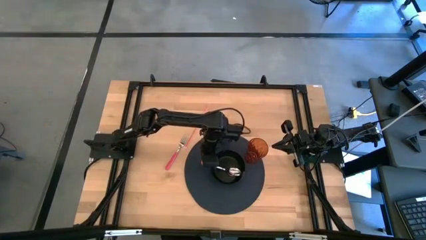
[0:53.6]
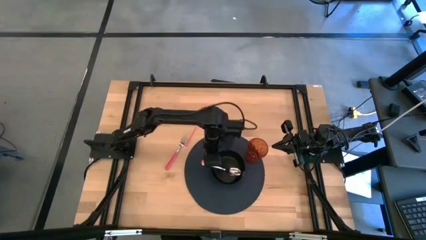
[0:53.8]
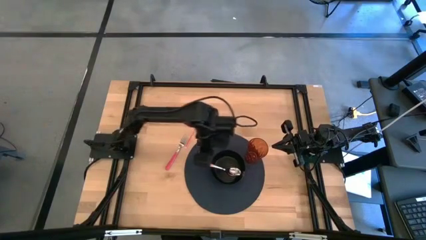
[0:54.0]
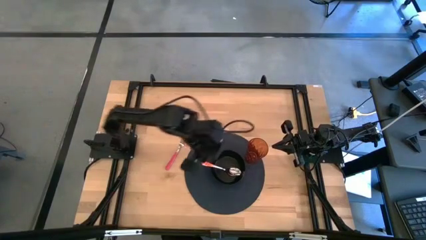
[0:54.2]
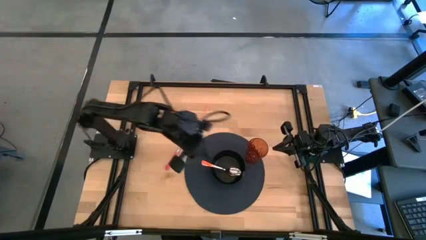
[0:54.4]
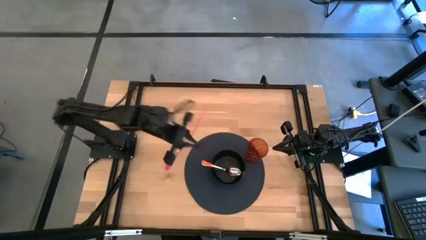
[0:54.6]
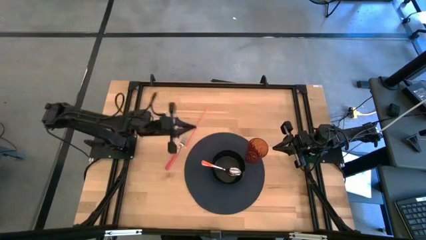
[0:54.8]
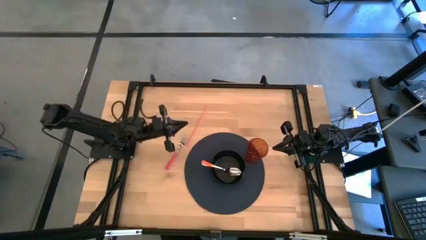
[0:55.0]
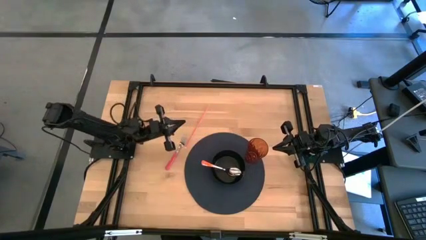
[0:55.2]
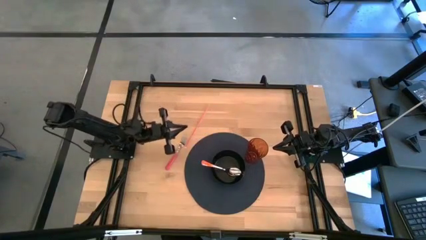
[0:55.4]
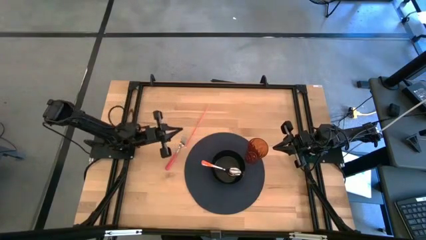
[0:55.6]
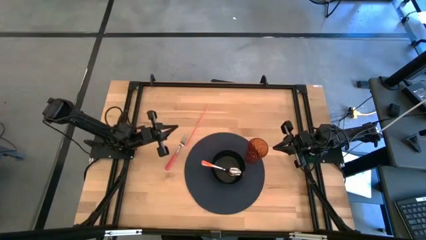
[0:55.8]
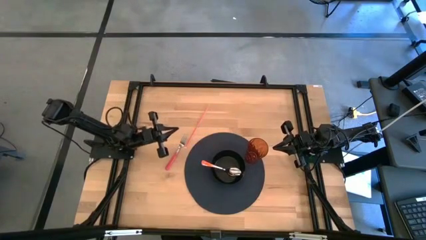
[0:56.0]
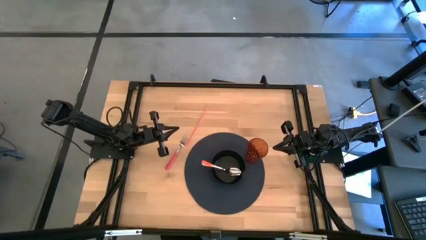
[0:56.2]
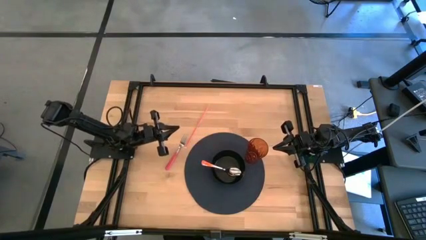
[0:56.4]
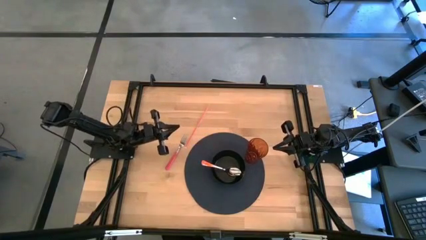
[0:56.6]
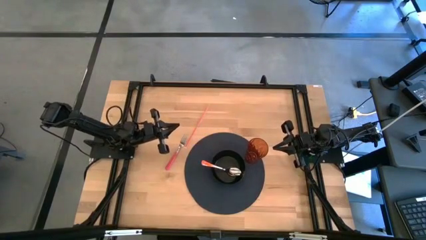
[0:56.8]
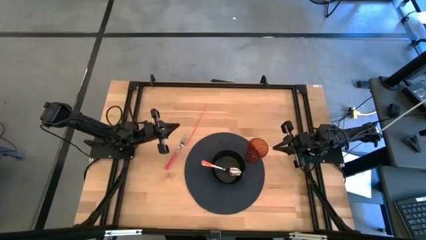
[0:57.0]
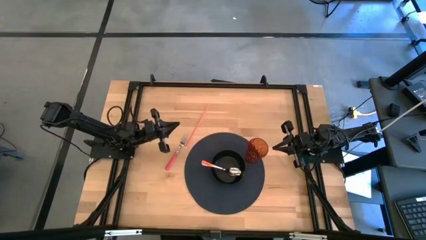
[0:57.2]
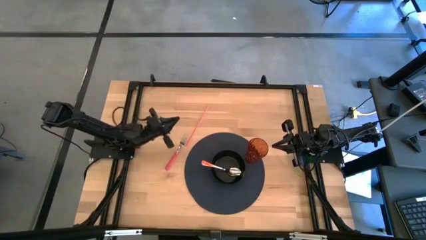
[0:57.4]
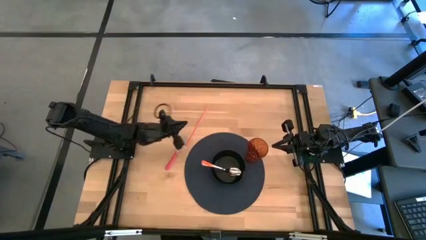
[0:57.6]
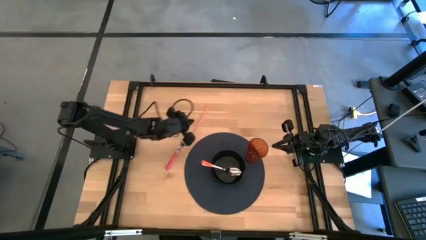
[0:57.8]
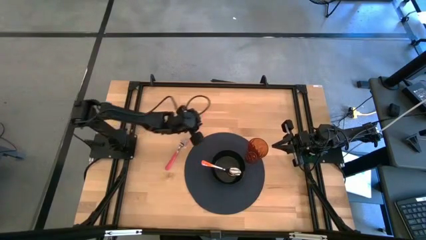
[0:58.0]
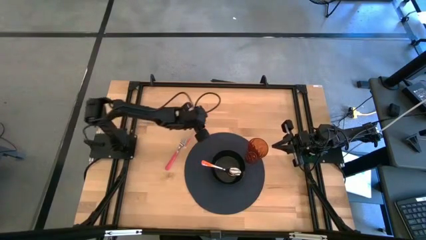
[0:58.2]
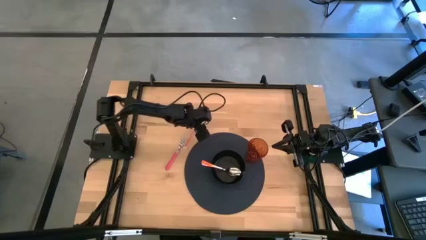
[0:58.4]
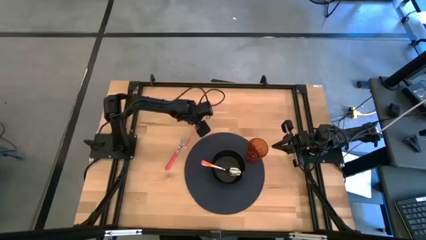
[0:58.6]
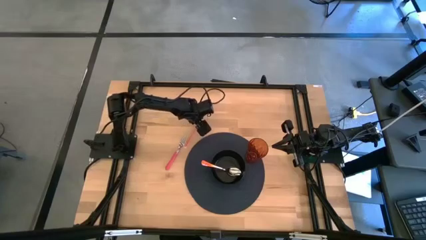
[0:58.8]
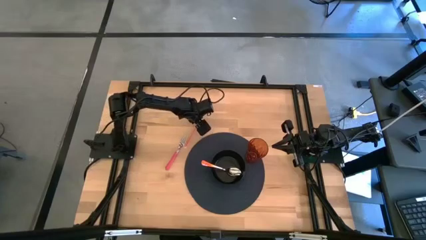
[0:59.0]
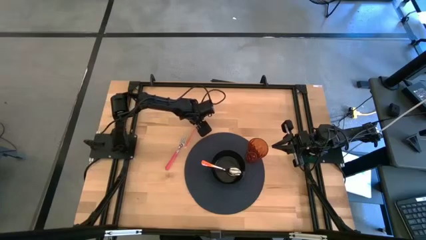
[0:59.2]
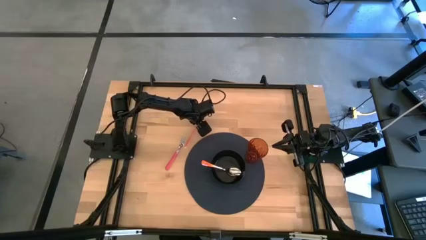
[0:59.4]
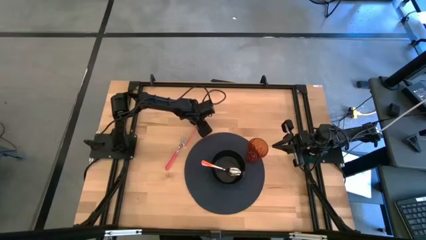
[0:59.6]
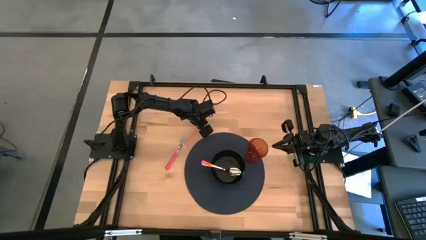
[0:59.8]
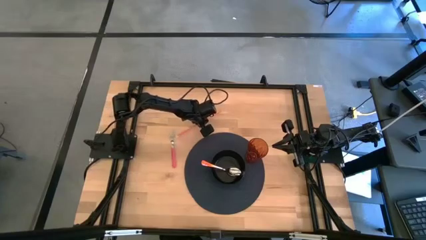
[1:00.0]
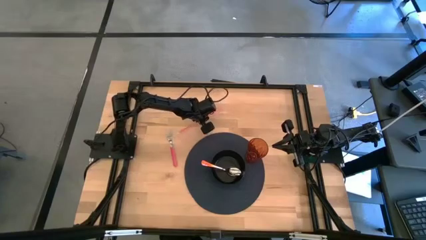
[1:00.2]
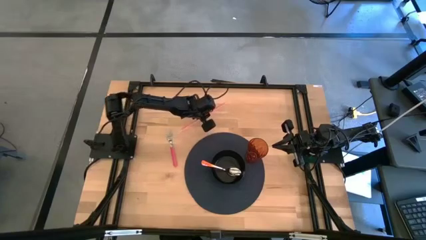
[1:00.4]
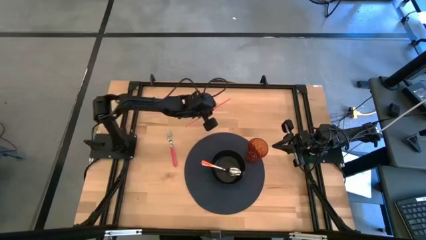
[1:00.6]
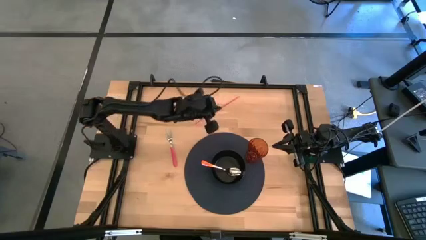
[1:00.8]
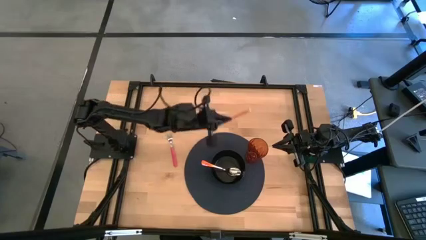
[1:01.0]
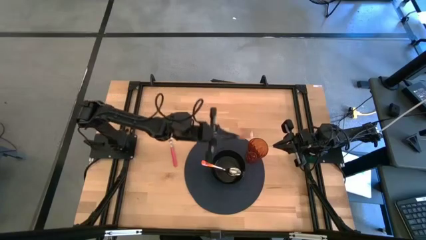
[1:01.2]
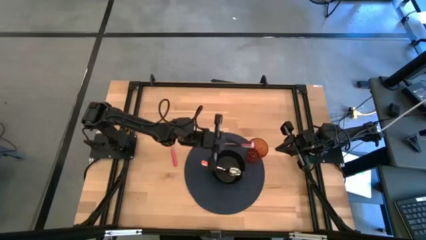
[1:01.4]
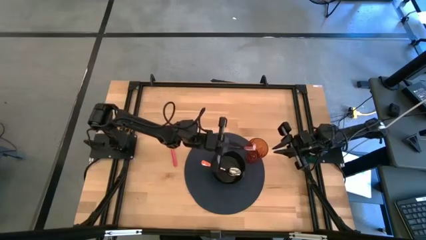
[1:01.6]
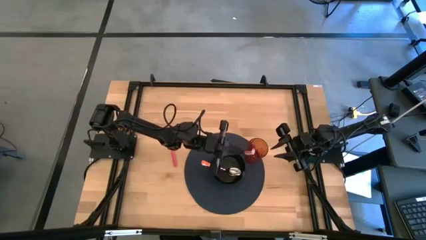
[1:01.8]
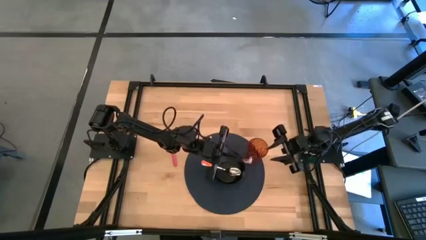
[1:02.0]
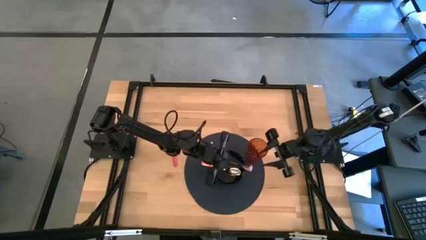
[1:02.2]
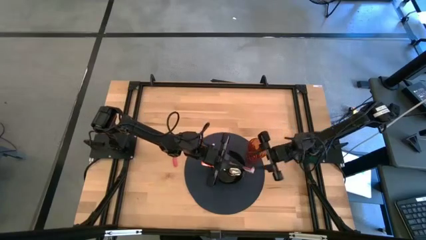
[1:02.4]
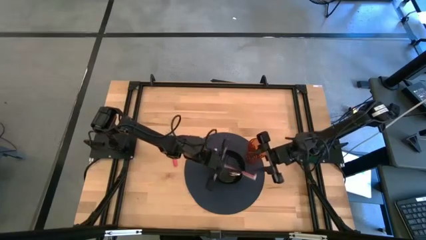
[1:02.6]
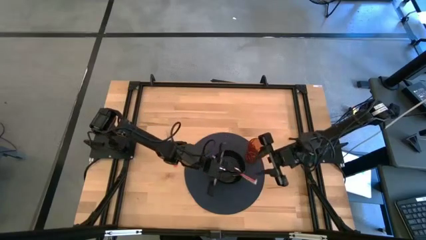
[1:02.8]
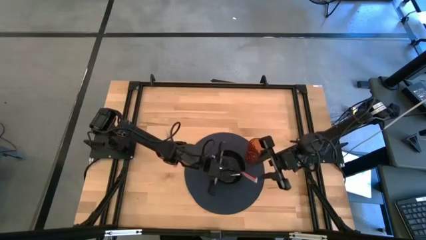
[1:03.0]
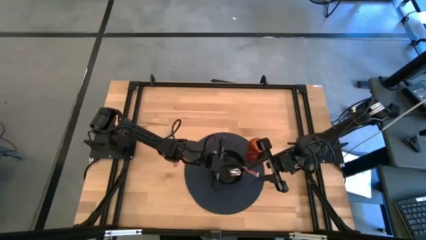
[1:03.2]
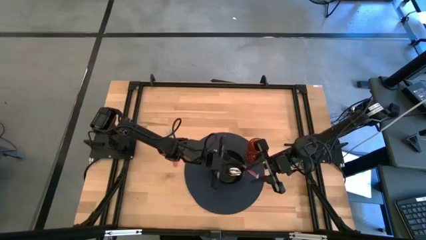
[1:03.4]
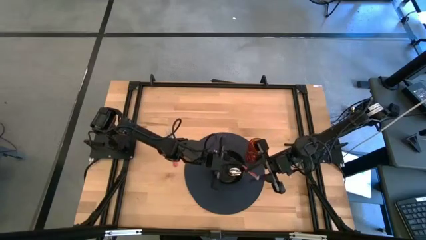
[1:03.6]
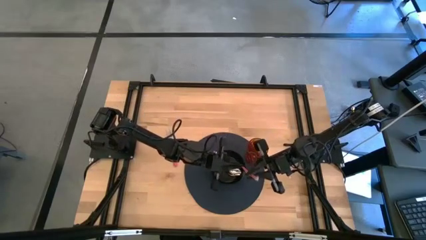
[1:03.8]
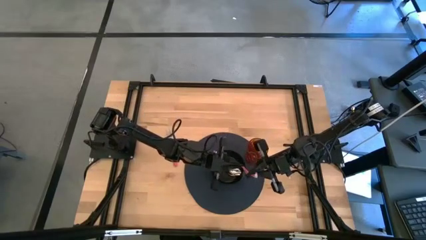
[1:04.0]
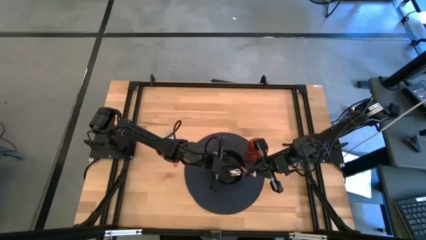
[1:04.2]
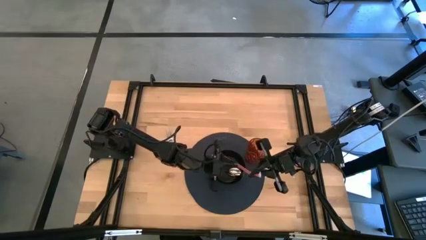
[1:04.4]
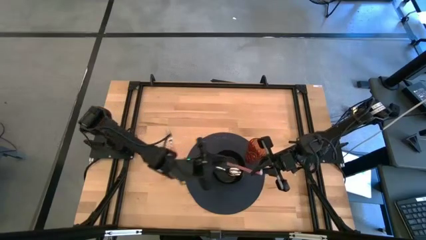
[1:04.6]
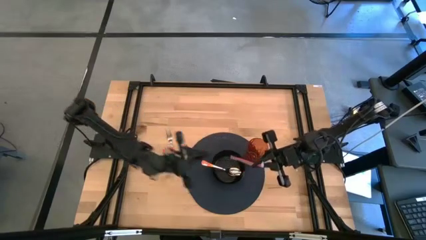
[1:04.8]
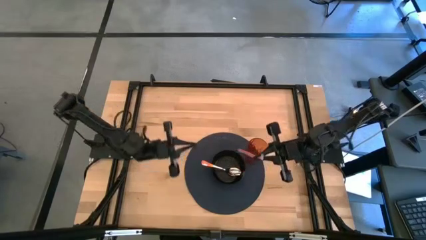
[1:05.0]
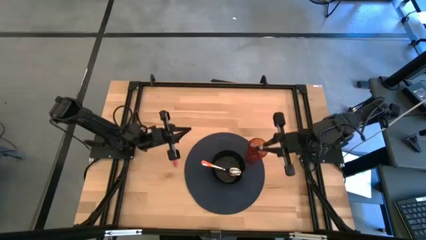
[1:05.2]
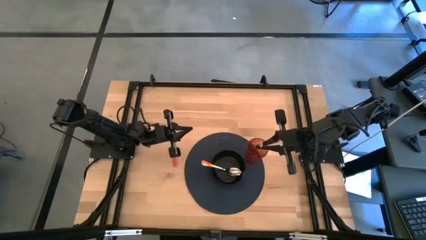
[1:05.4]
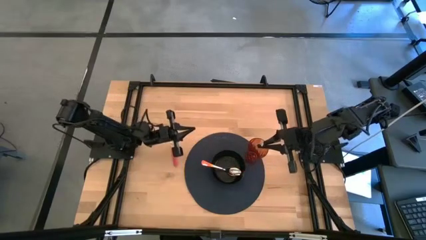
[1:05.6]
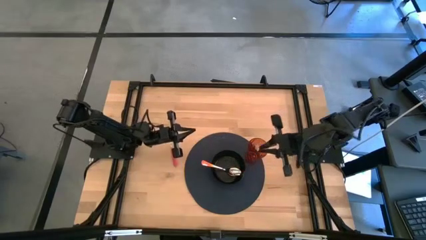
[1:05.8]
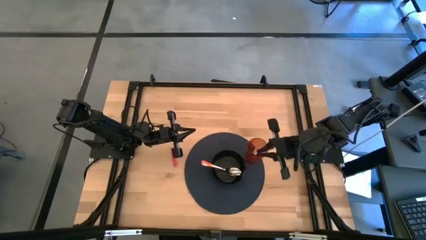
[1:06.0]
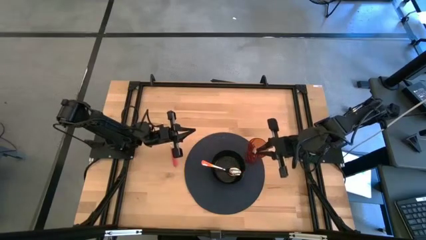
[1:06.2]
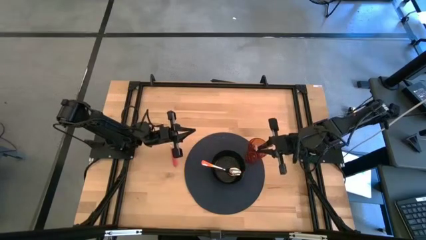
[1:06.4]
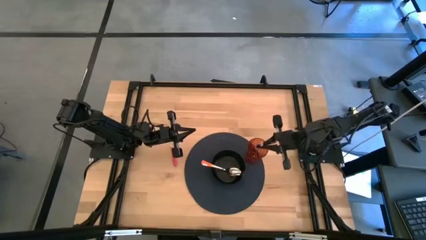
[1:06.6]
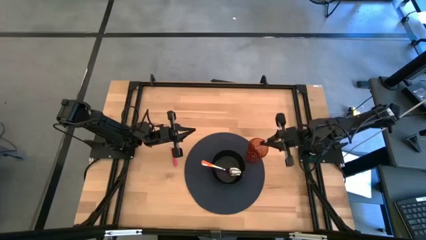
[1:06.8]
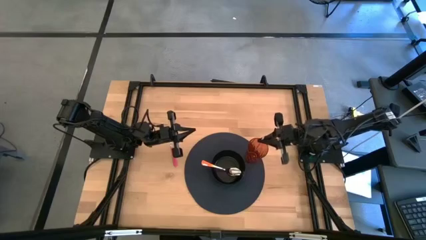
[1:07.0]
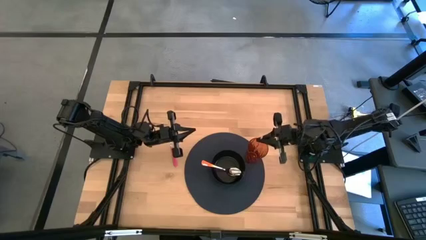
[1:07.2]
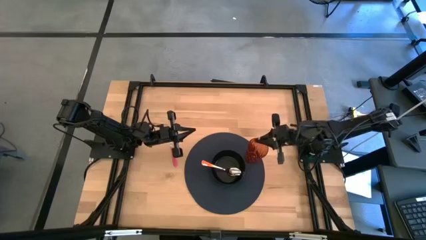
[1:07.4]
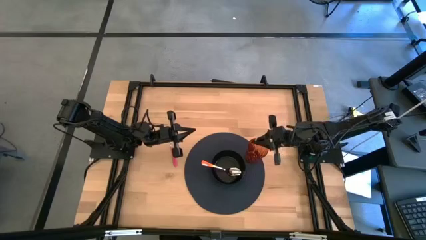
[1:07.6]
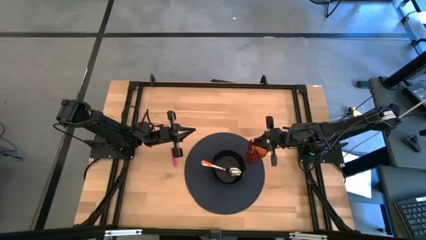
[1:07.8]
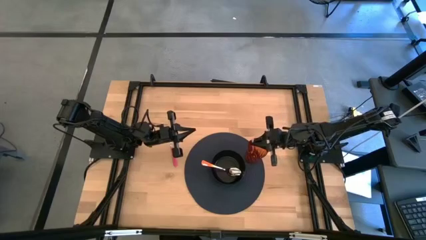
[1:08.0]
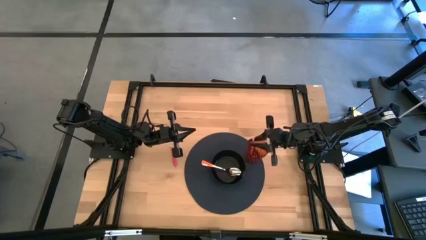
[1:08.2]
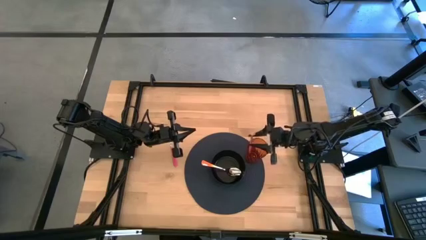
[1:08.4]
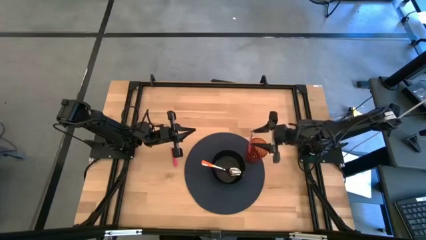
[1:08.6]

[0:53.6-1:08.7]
Task: Pick & Place Utensil
Put the orange straw in the brown cup
